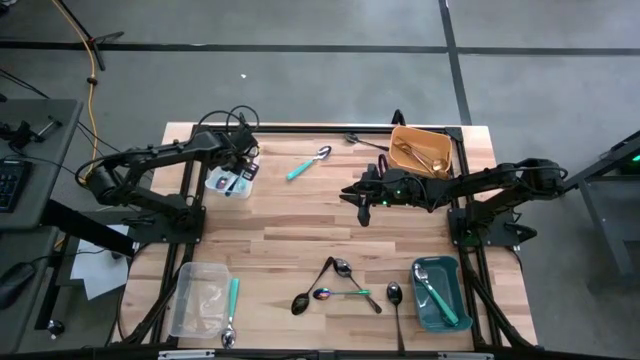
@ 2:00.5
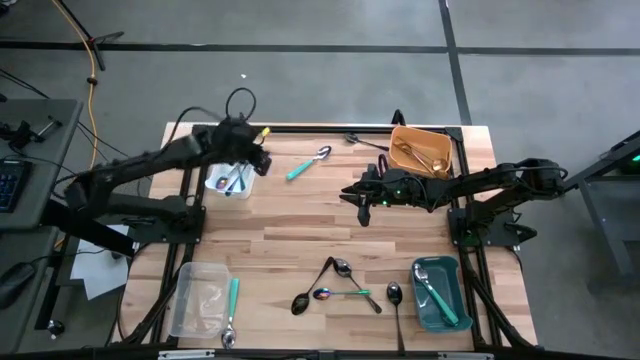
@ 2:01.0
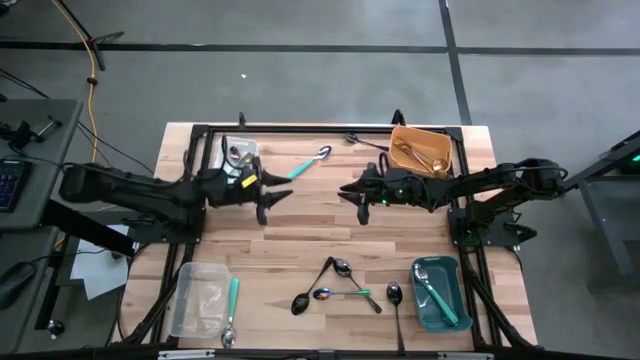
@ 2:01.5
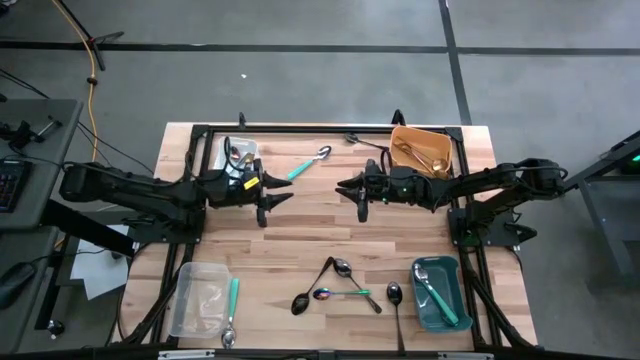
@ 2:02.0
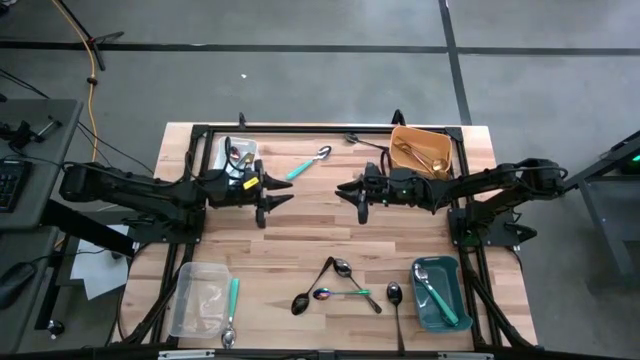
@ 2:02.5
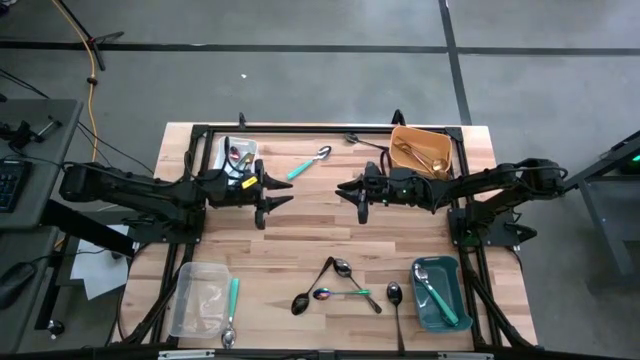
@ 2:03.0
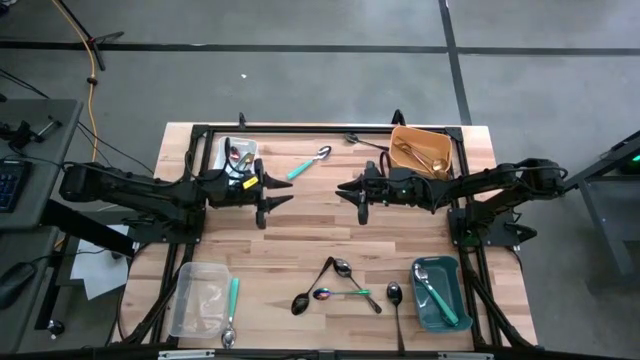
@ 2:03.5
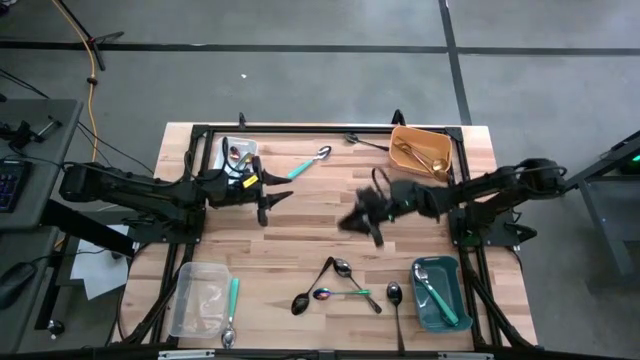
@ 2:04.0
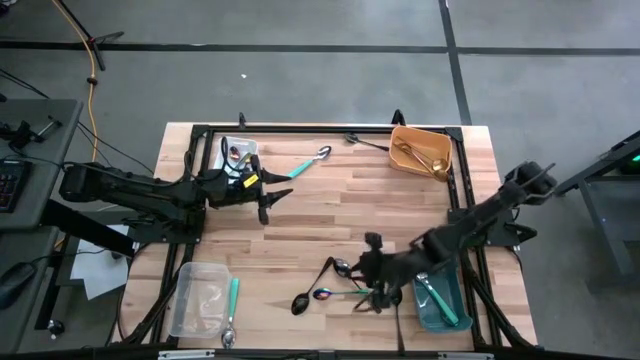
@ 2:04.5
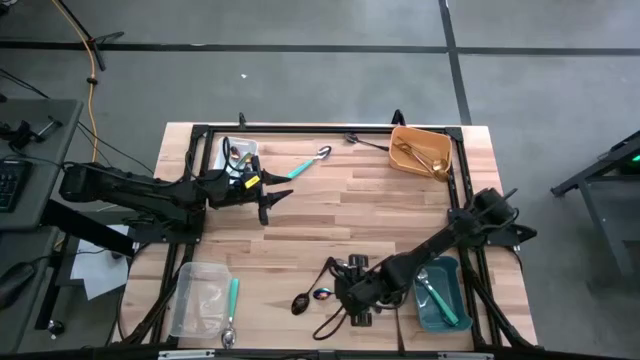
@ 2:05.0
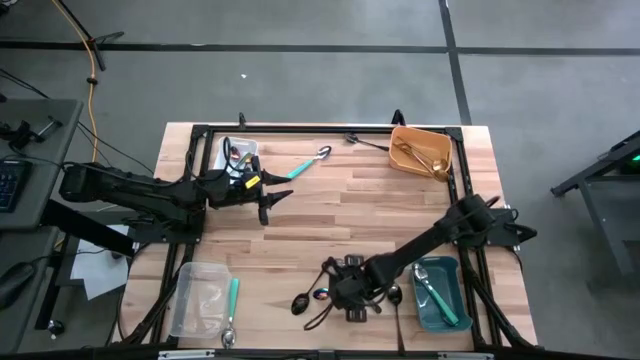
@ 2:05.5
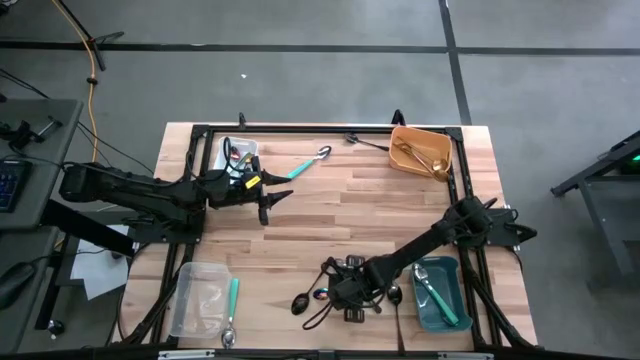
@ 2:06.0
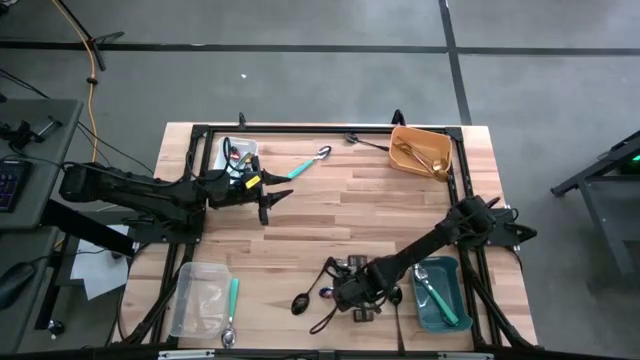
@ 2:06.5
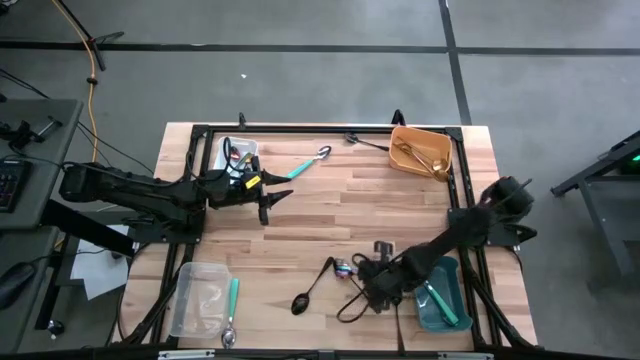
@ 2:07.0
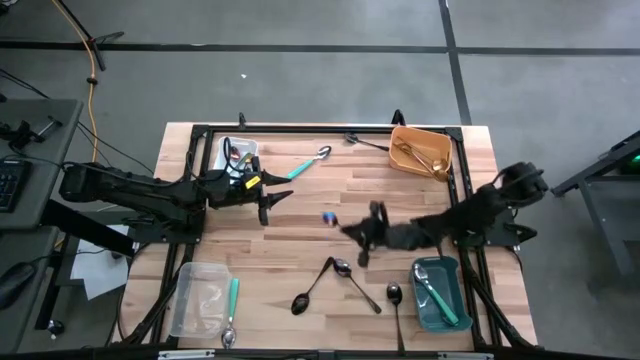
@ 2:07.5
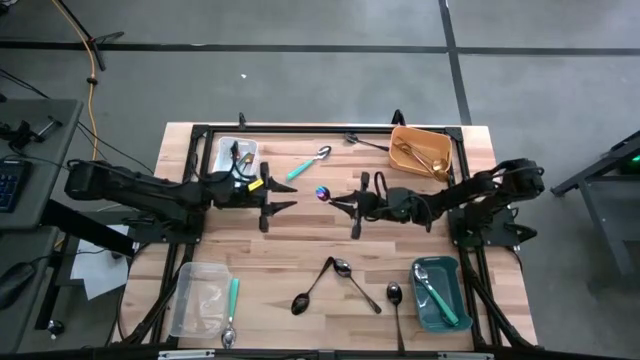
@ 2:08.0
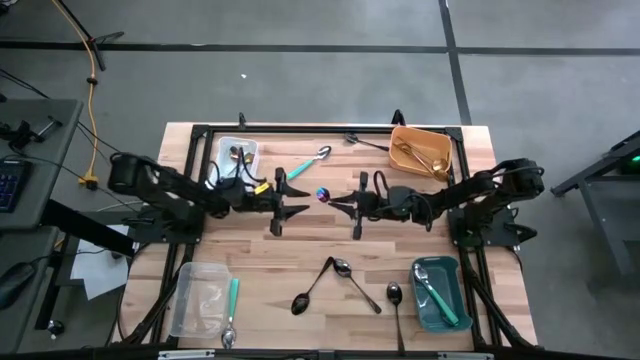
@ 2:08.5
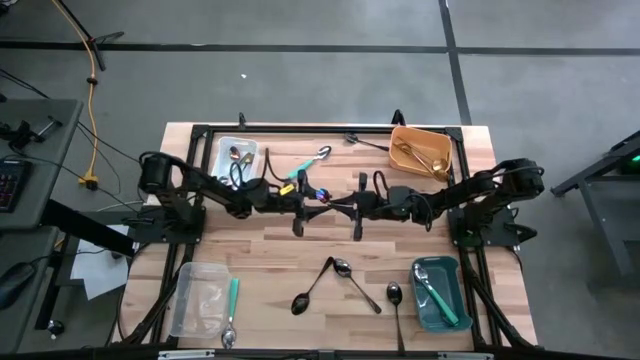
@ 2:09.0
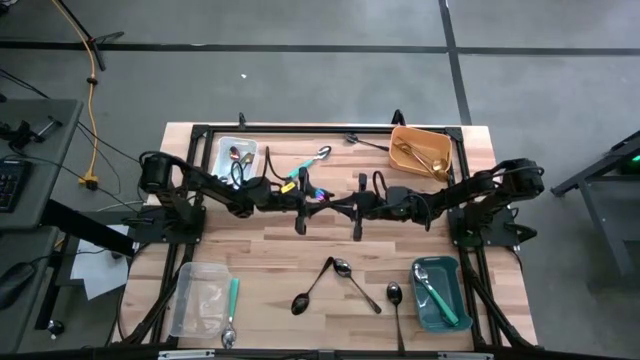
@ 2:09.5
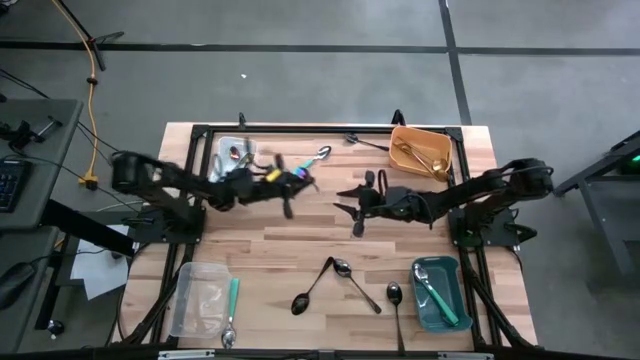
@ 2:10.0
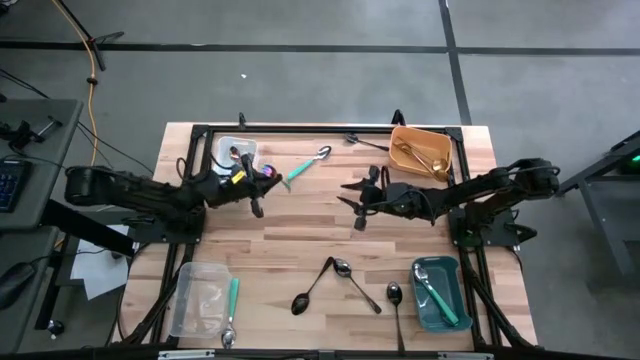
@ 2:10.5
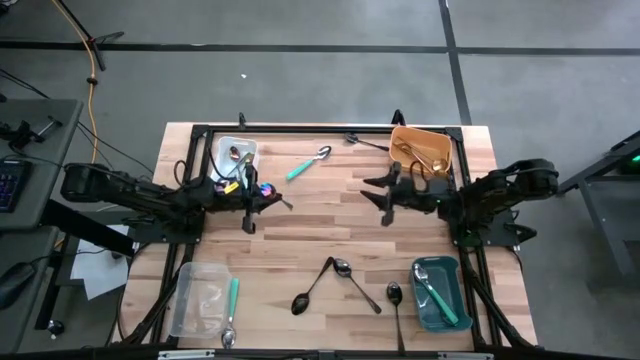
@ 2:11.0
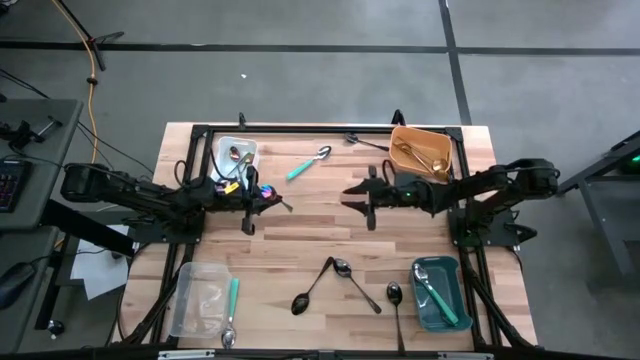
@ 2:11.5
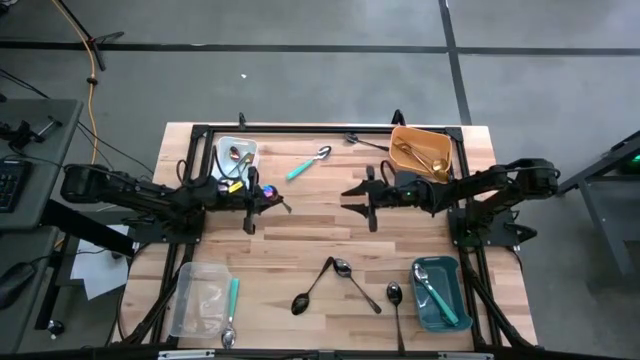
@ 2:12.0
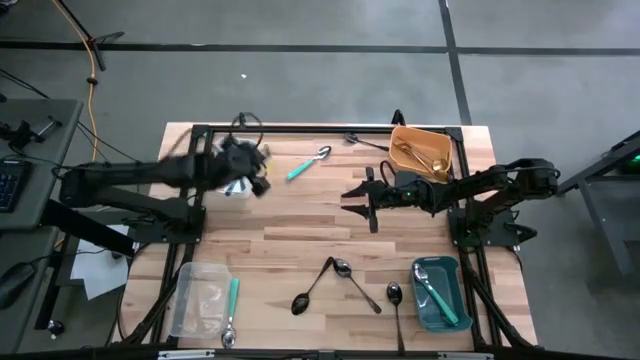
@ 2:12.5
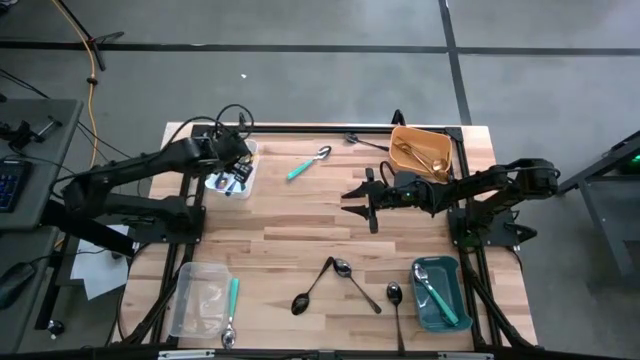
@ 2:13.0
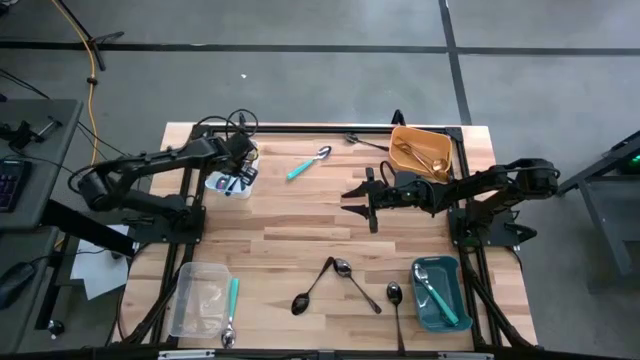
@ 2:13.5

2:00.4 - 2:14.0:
Task: Sort silverware by color (type)
Put the violet spoon into the white bin

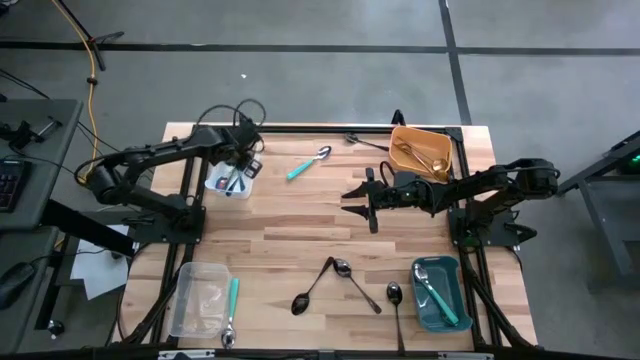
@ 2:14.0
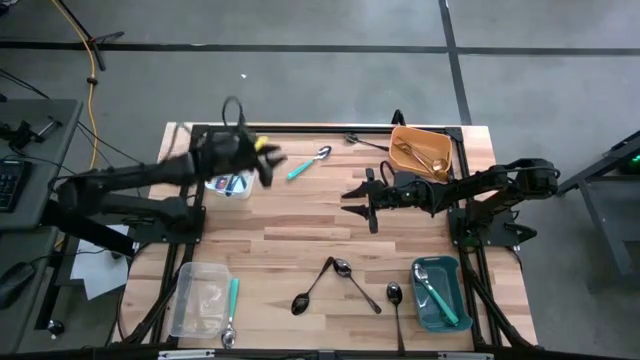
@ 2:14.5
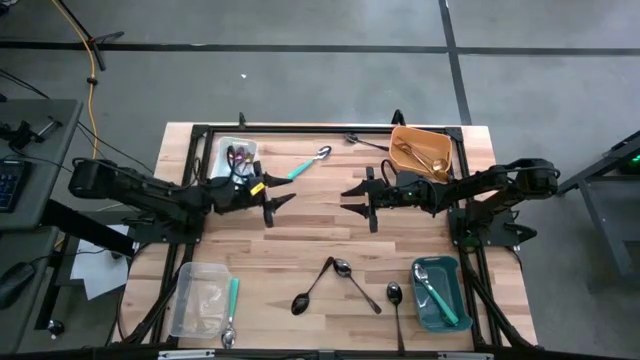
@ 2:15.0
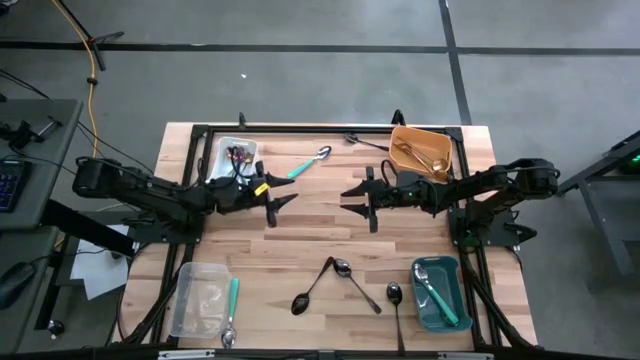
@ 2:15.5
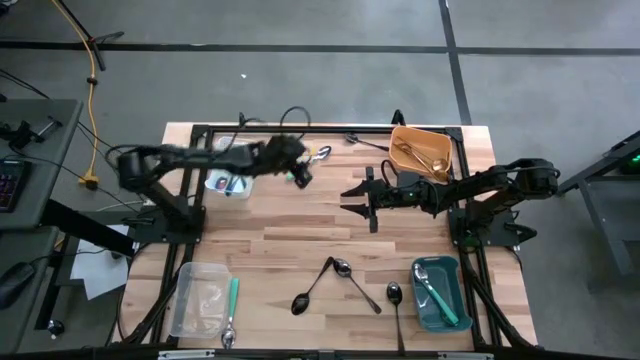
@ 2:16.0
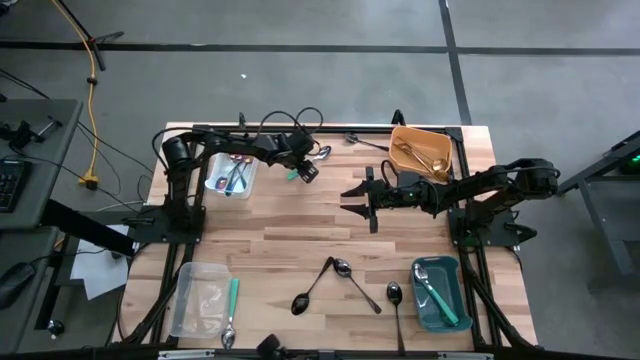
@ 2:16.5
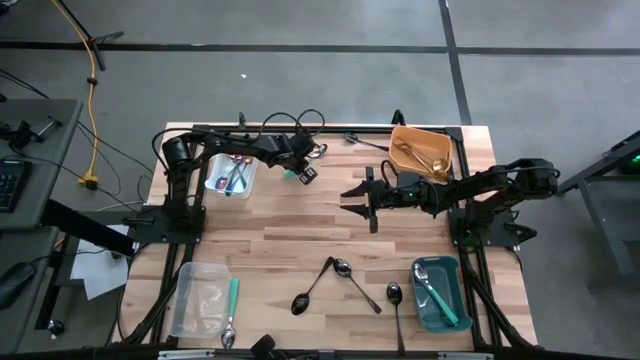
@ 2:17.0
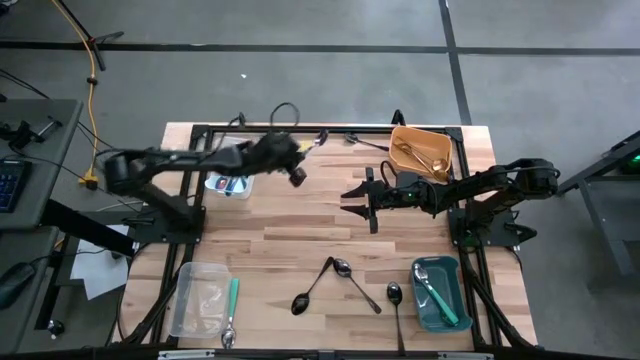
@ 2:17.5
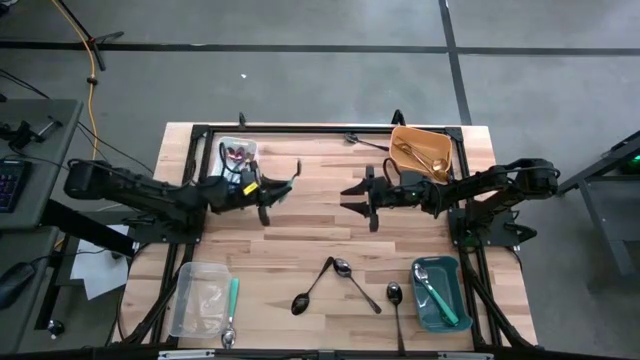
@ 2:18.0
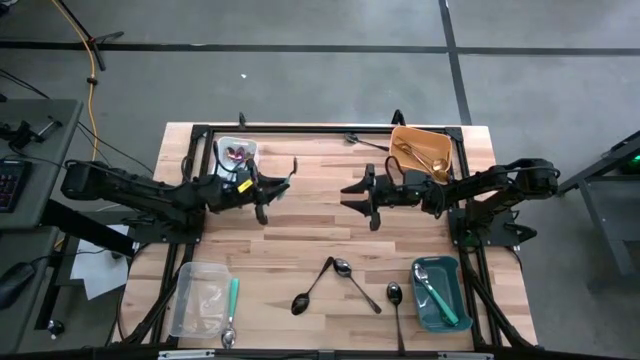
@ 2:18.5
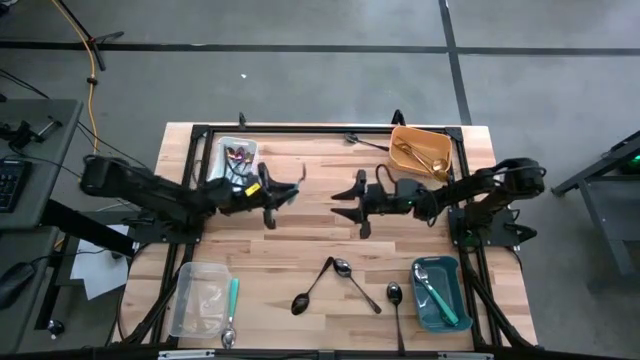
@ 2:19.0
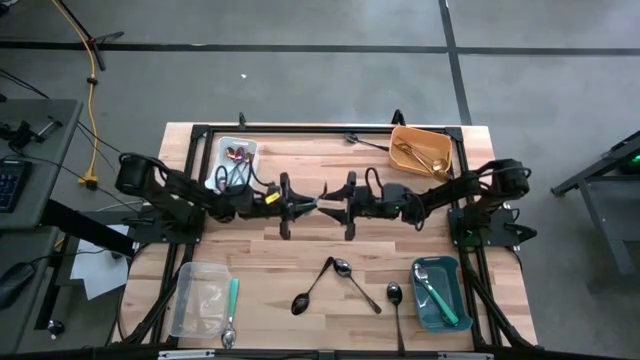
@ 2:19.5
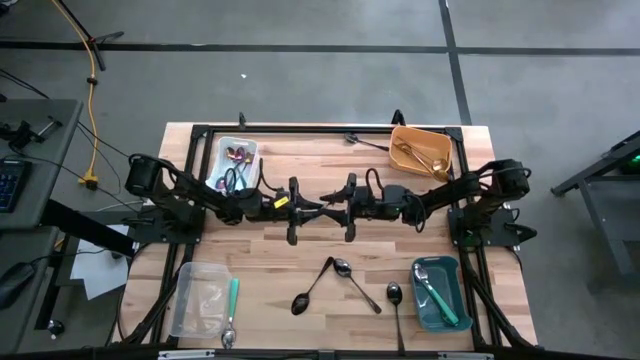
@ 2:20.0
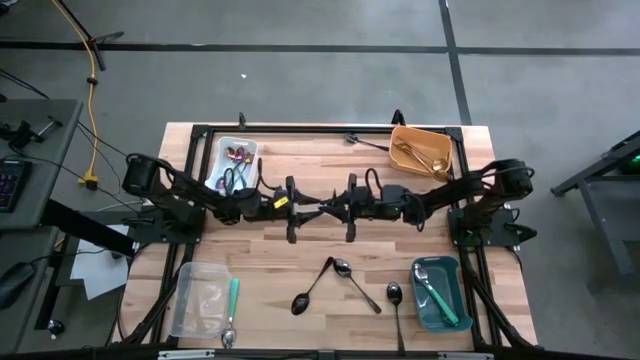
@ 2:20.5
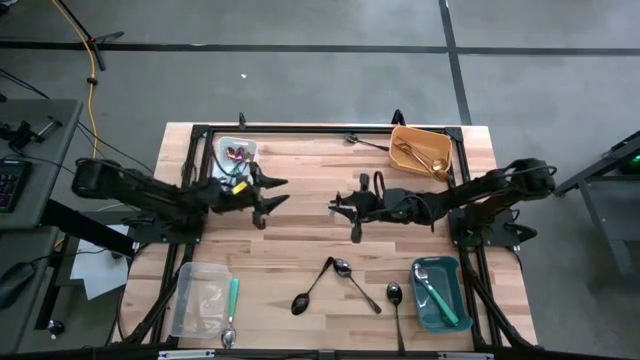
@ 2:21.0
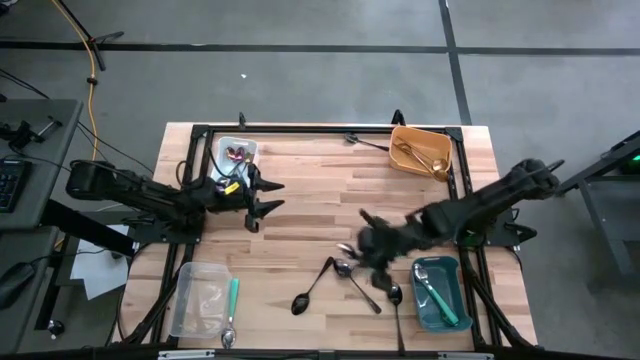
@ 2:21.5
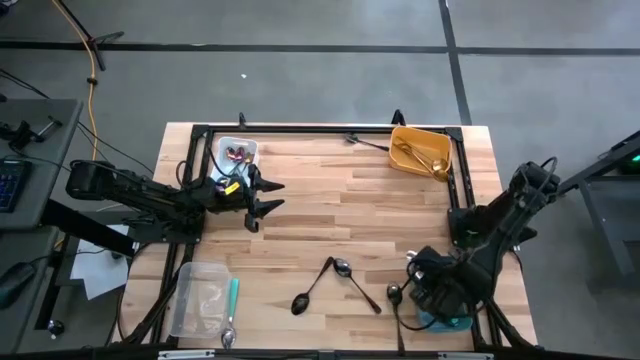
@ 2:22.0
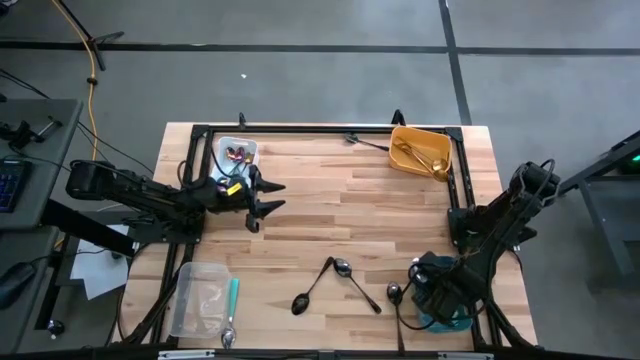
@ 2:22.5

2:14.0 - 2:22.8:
Put the green spoon into the blue bin
